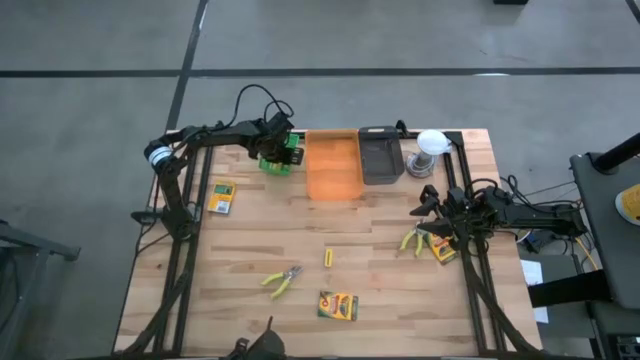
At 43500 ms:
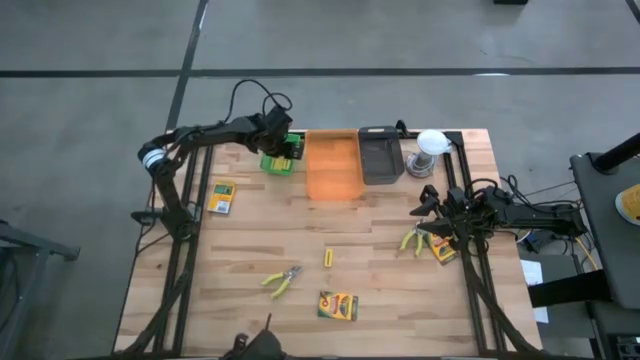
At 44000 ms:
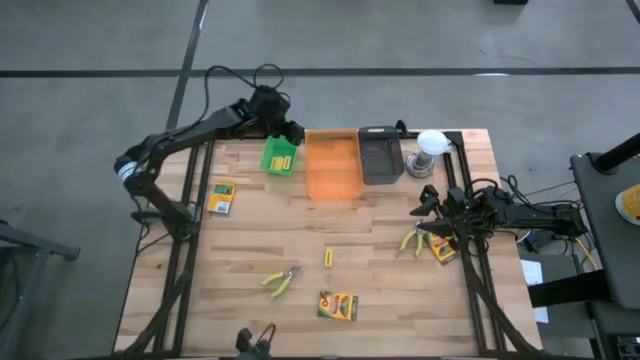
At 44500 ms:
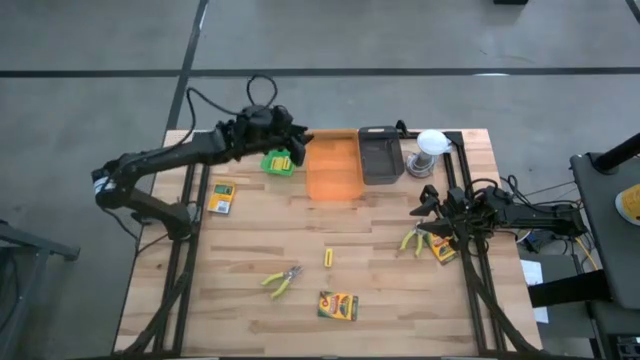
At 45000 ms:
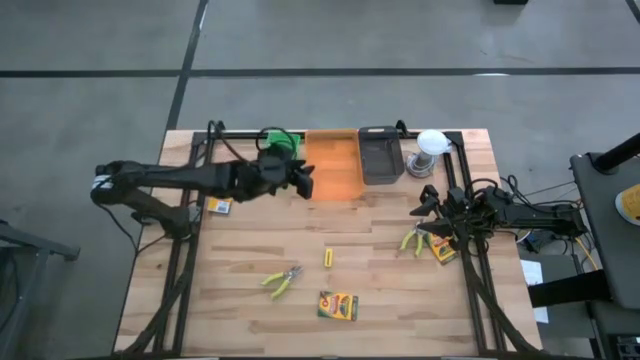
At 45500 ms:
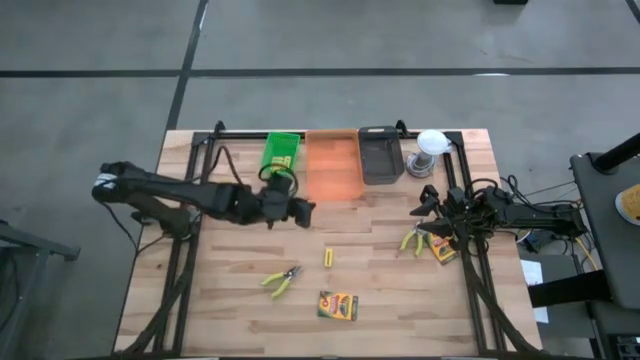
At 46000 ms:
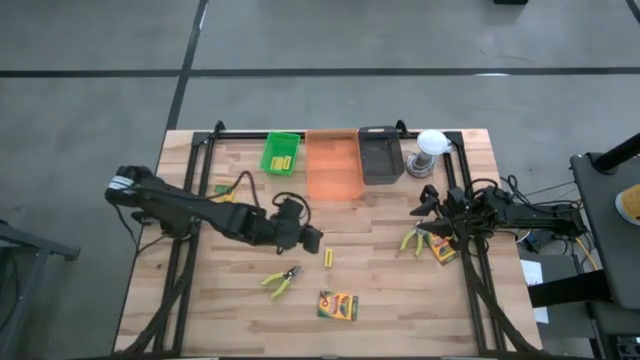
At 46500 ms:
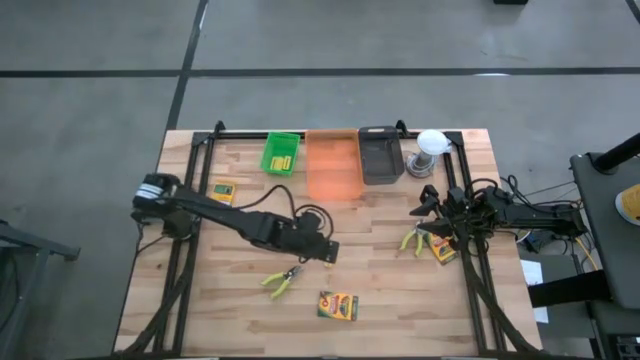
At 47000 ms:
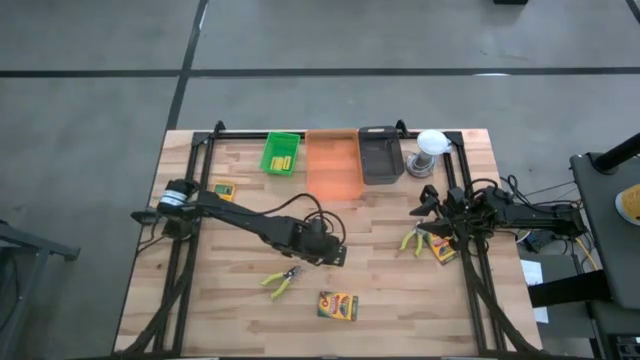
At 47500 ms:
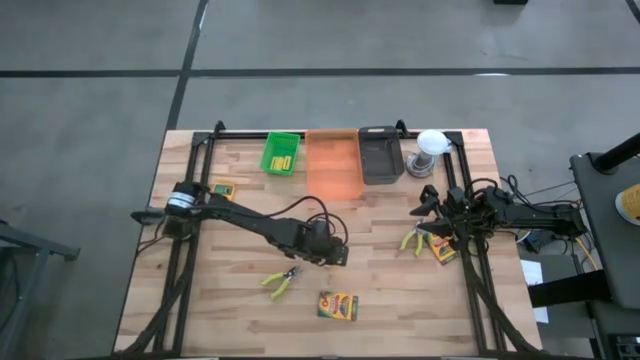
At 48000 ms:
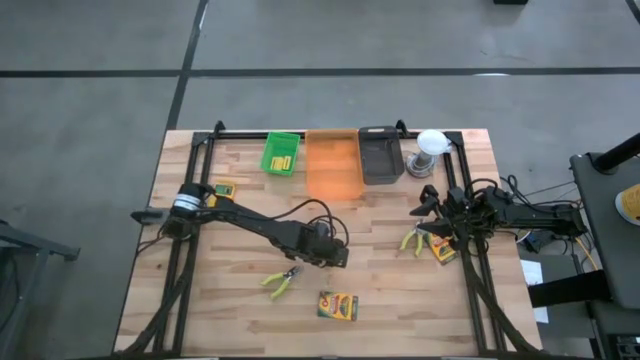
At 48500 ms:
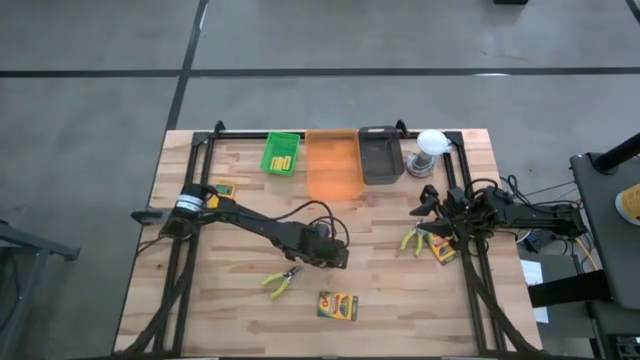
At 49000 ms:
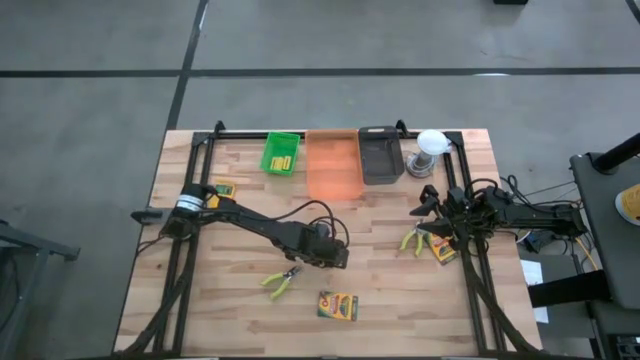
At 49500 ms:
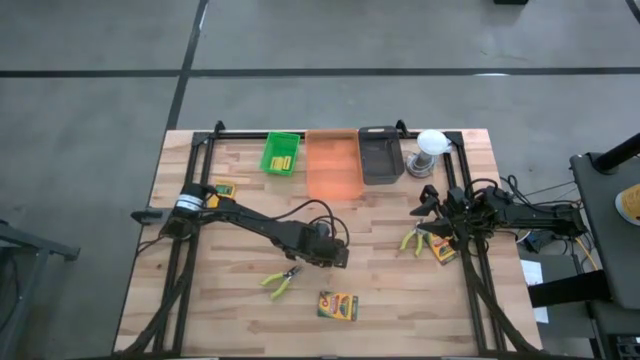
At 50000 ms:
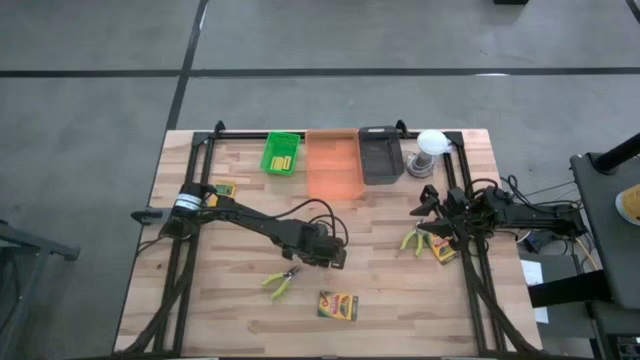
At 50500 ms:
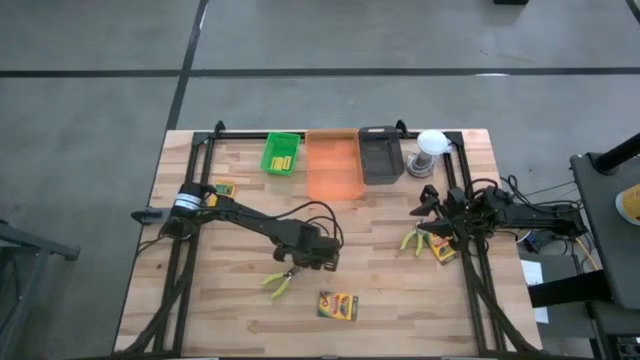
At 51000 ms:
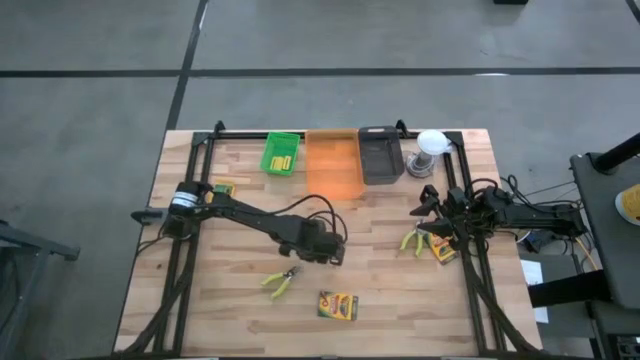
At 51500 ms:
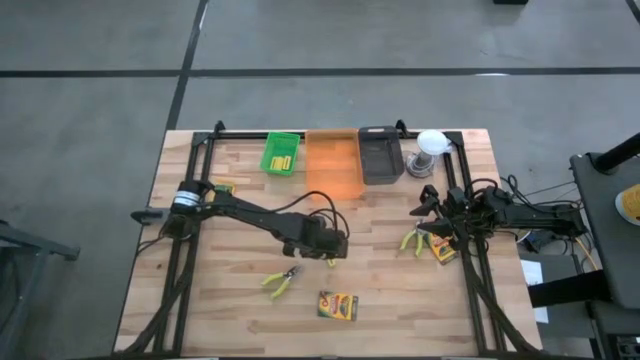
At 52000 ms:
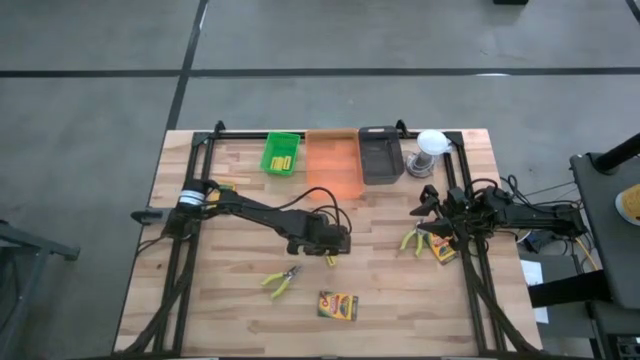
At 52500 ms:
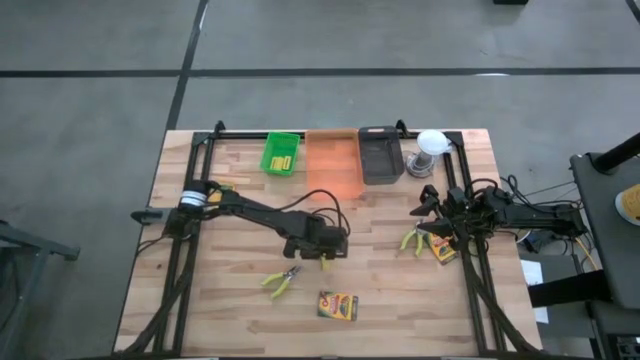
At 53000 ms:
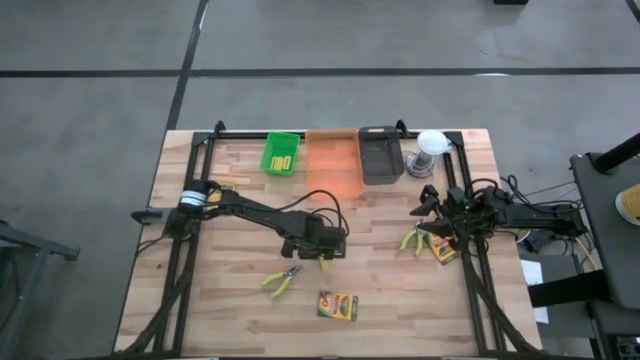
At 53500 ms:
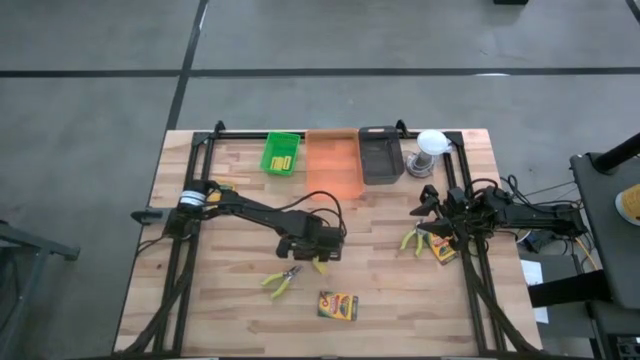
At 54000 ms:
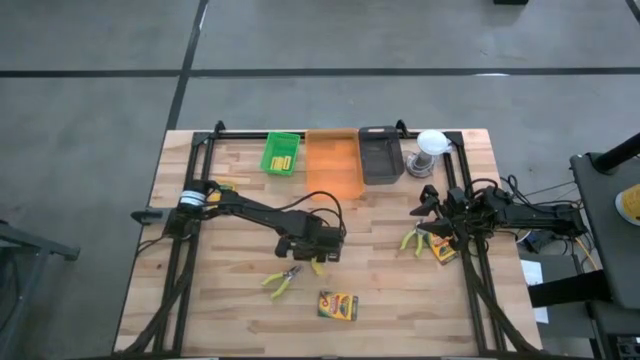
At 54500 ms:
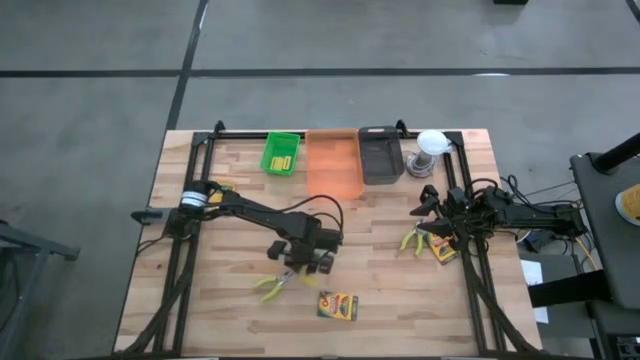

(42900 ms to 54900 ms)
Task: Pick & Place School Supplies
Put the yellow eraser into the green bin

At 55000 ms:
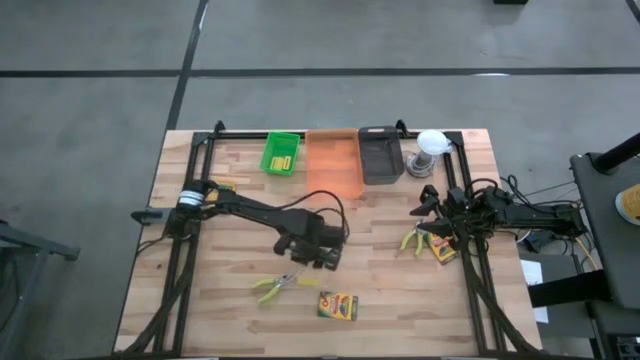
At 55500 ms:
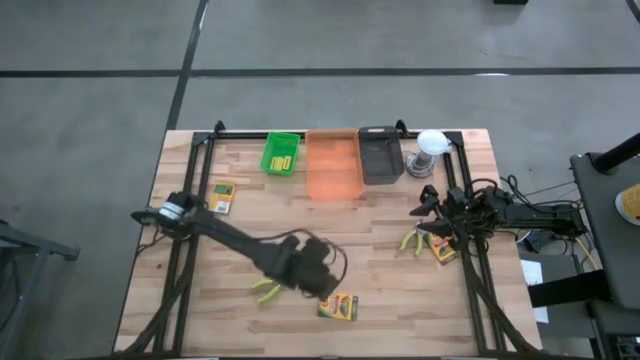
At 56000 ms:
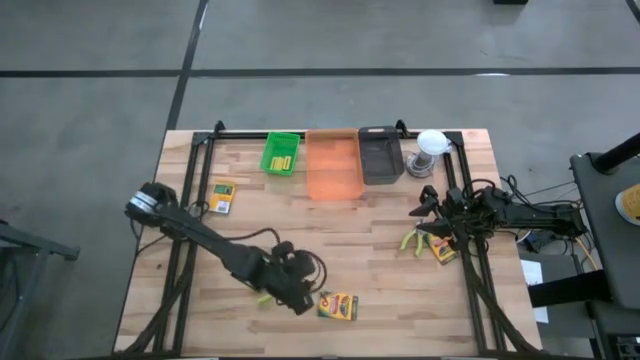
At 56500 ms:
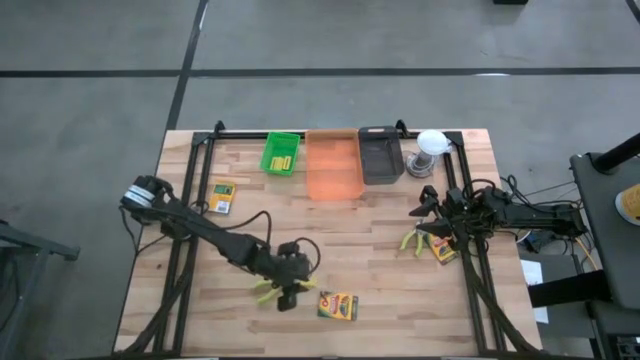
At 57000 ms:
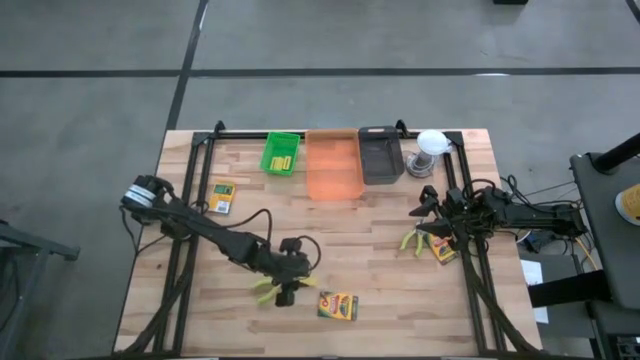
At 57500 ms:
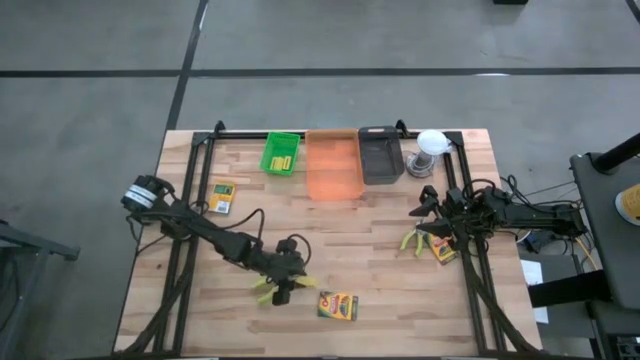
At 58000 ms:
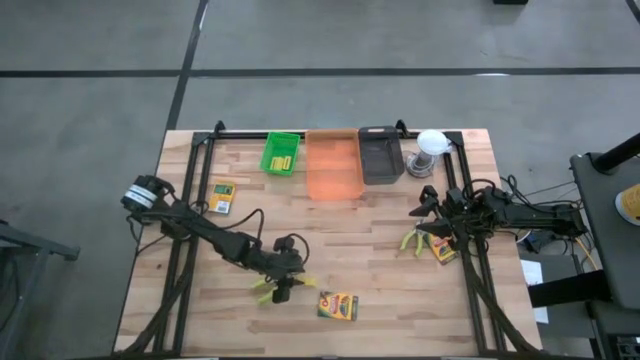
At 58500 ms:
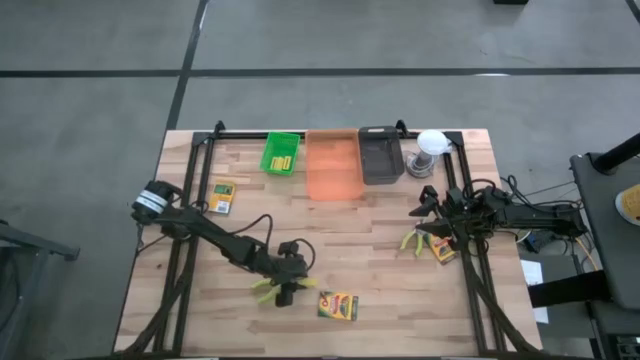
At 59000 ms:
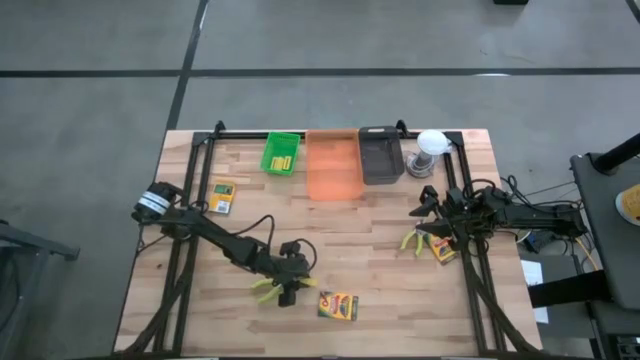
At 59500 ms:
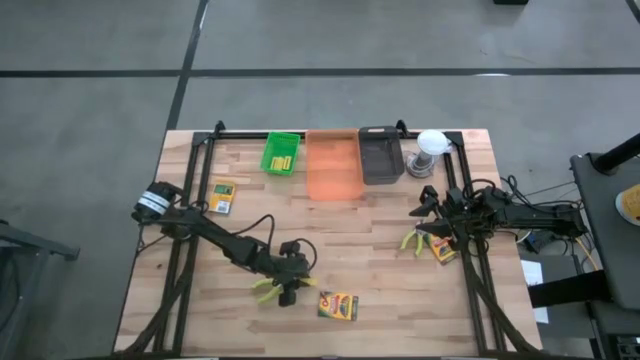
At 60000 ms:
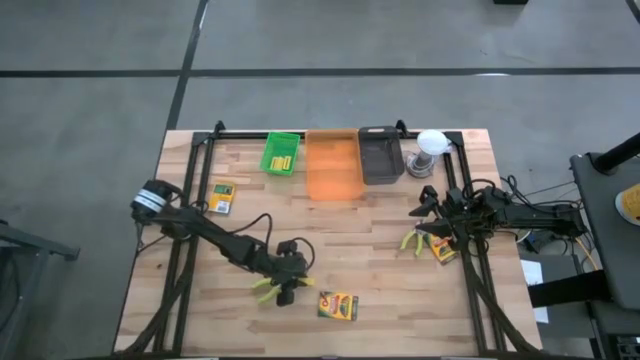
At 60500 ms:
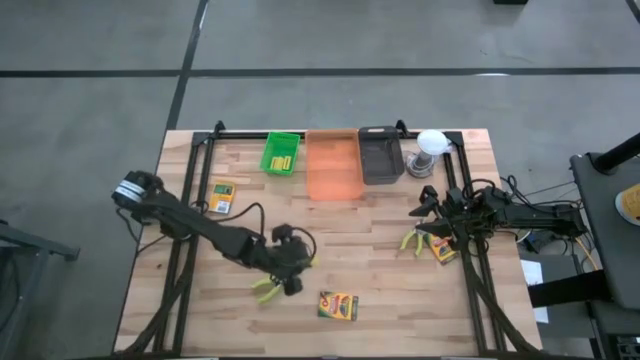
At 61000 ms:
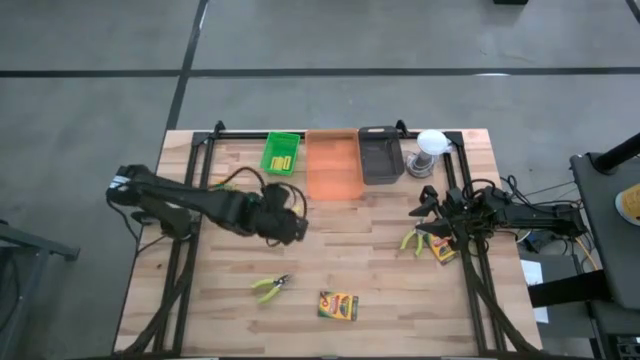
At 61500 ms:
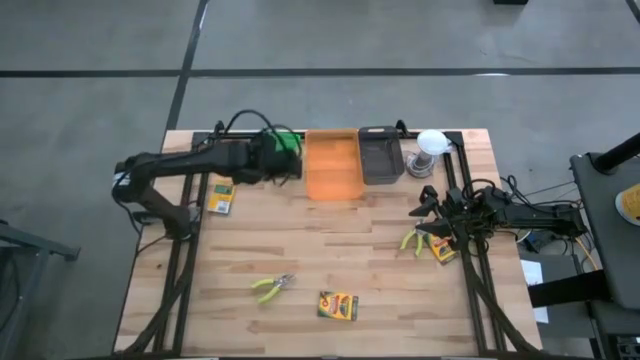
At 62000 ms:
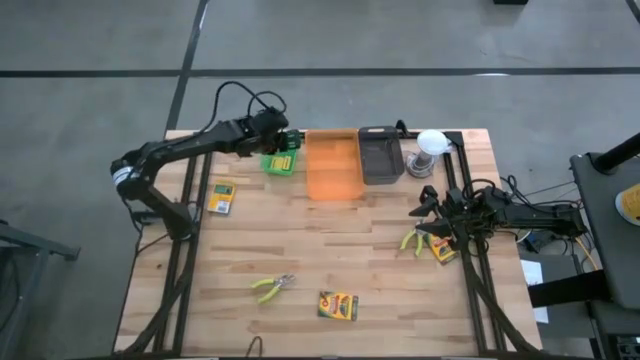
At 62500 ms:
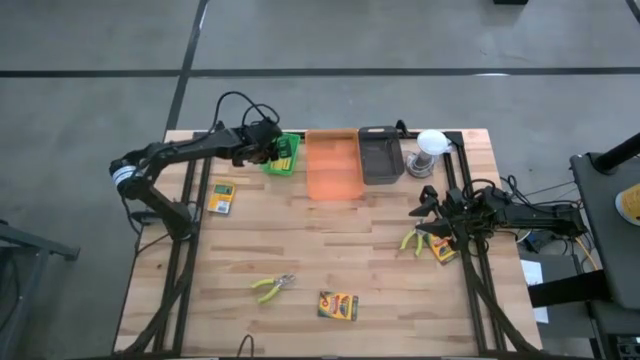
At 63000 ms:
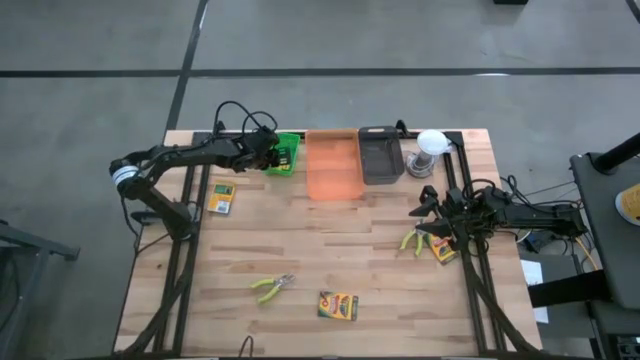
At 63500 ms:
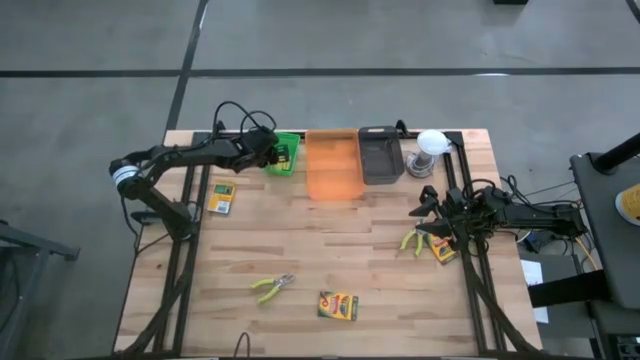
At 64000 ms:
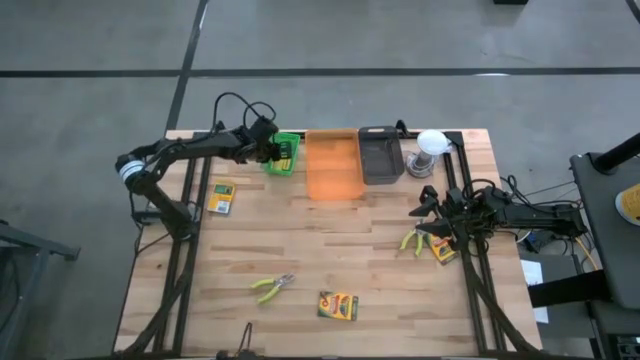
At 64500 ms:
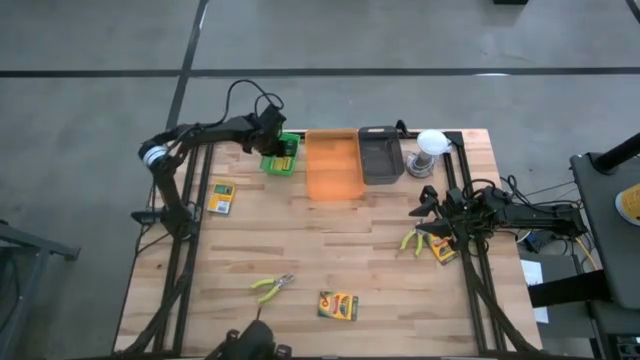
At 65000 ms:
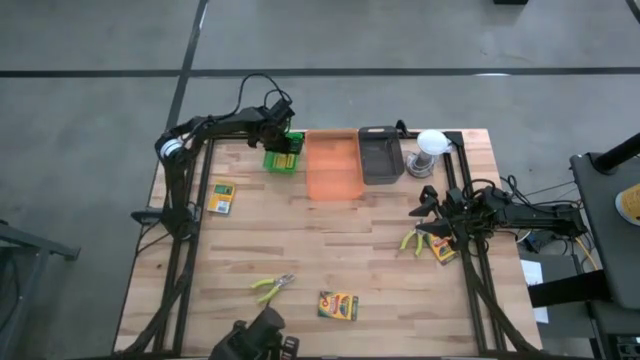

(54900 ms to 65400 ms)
Put the yellow eraser into the green bin
